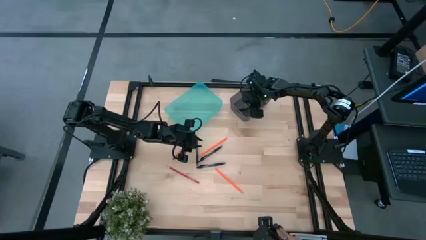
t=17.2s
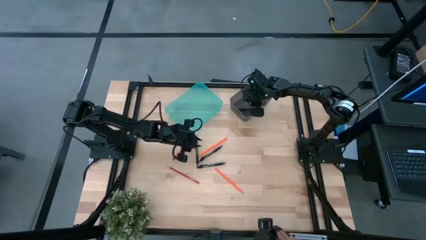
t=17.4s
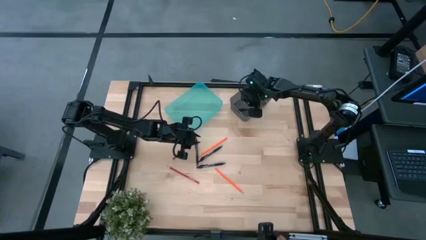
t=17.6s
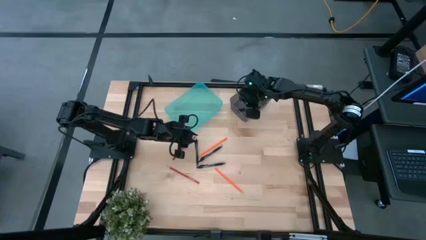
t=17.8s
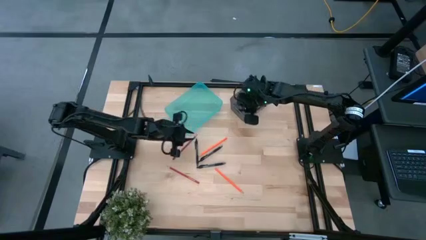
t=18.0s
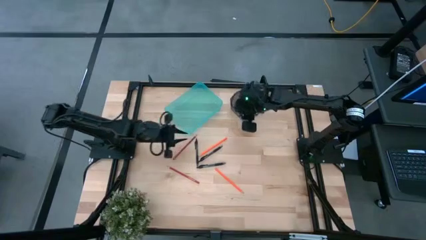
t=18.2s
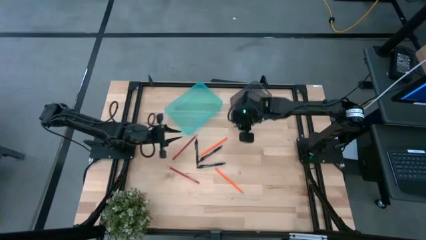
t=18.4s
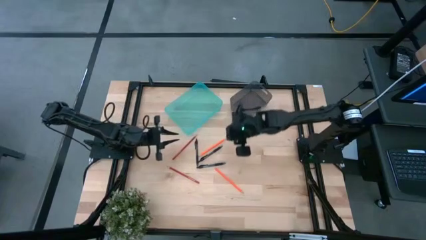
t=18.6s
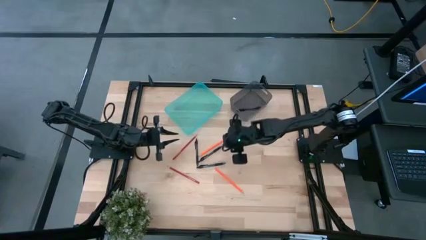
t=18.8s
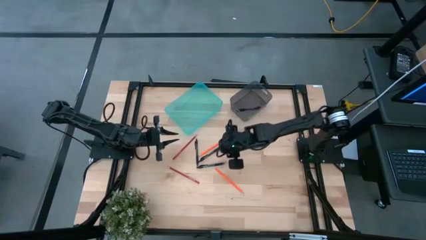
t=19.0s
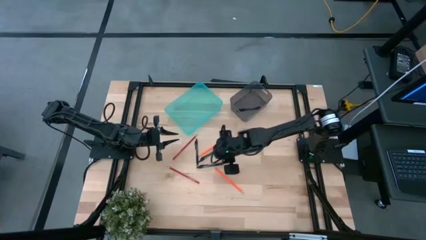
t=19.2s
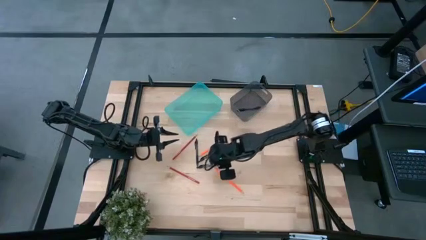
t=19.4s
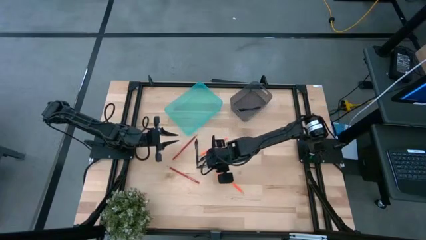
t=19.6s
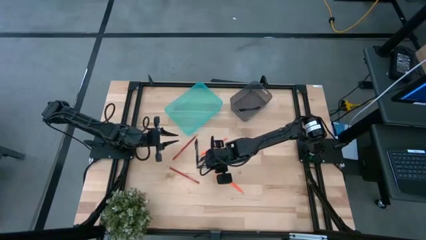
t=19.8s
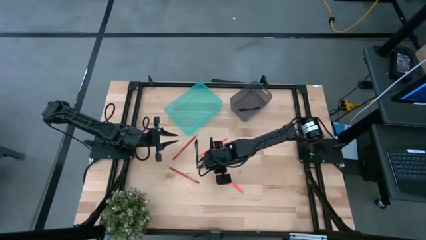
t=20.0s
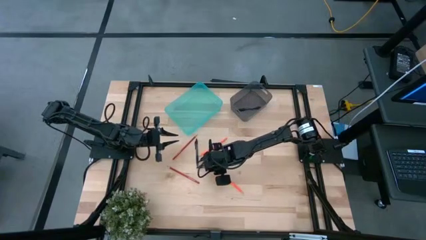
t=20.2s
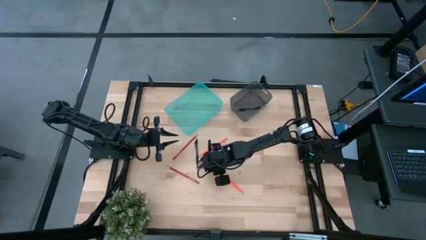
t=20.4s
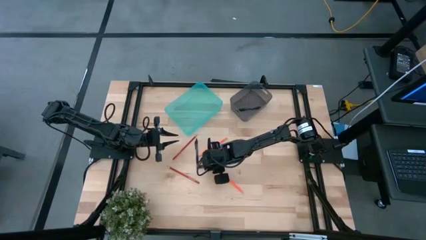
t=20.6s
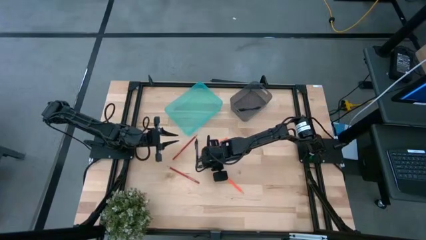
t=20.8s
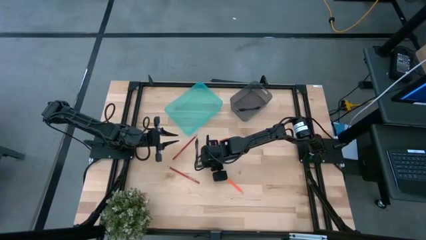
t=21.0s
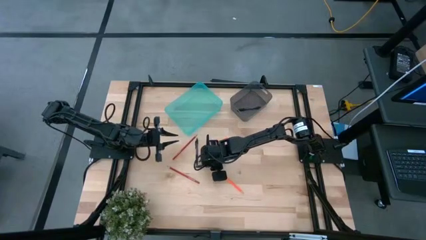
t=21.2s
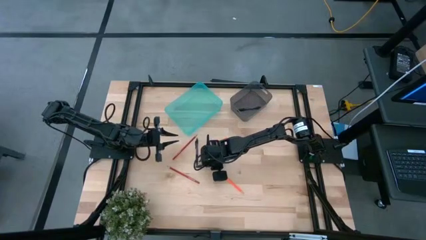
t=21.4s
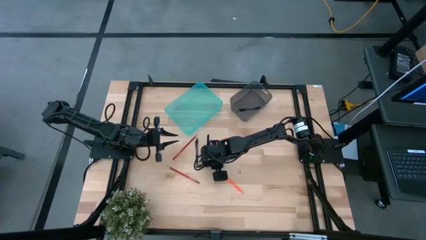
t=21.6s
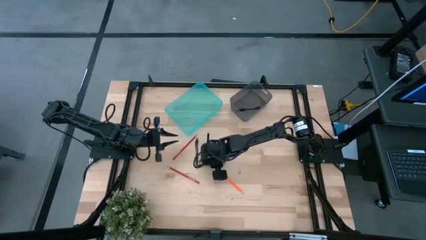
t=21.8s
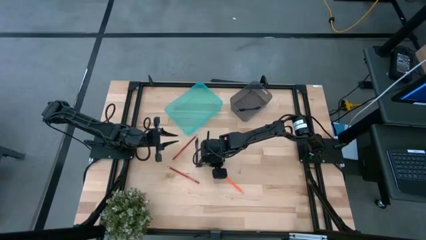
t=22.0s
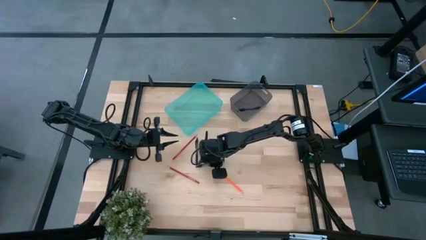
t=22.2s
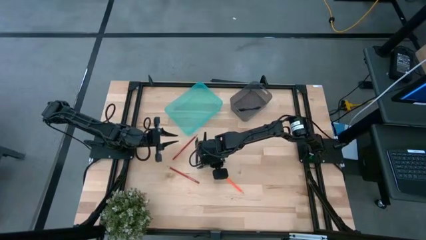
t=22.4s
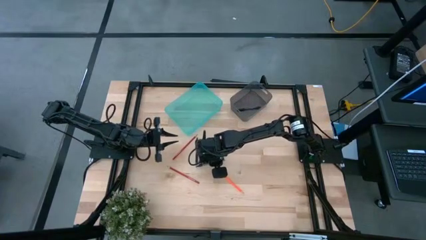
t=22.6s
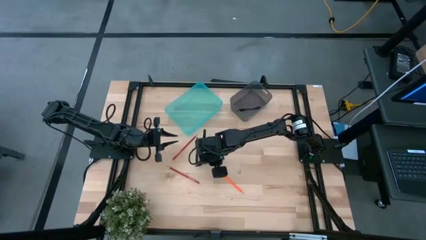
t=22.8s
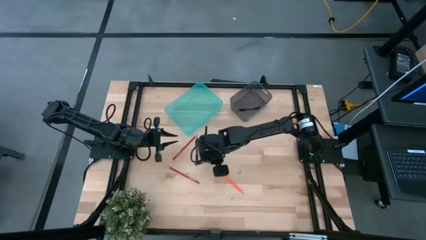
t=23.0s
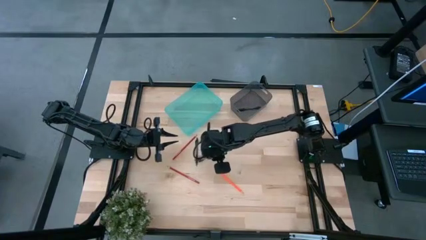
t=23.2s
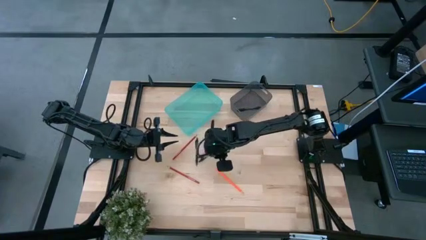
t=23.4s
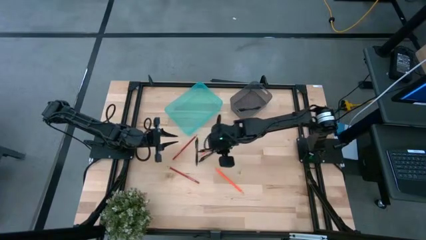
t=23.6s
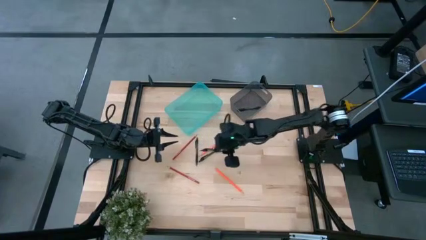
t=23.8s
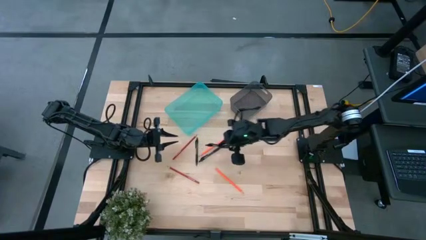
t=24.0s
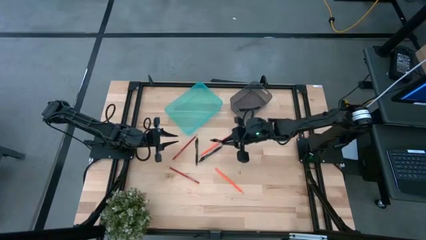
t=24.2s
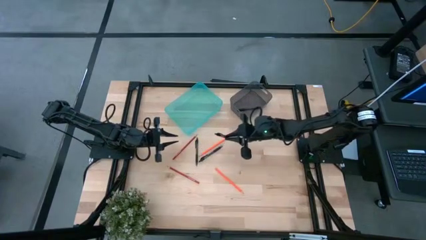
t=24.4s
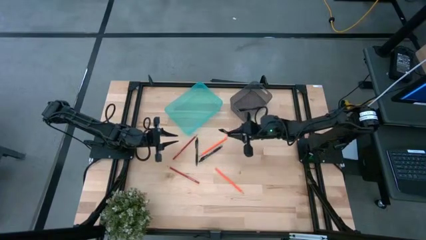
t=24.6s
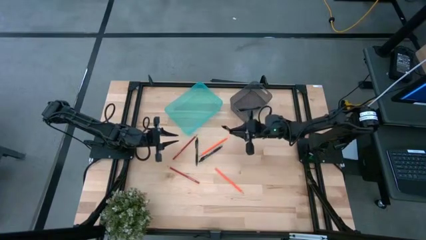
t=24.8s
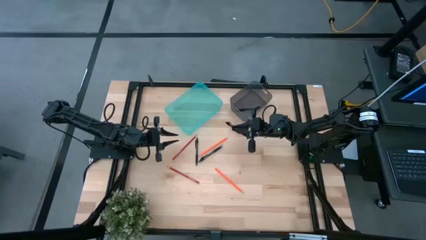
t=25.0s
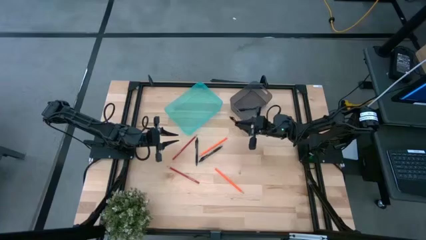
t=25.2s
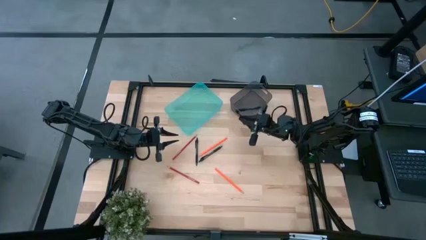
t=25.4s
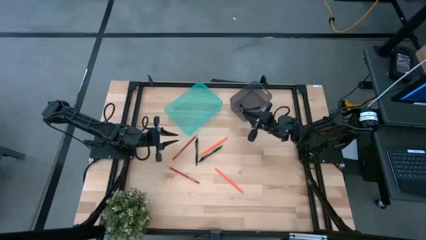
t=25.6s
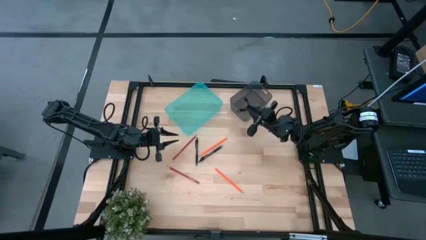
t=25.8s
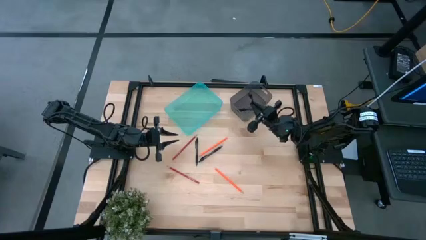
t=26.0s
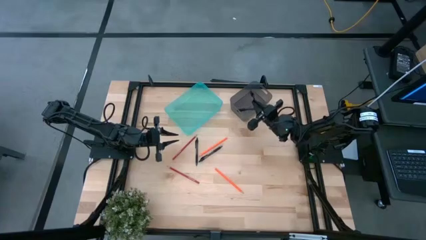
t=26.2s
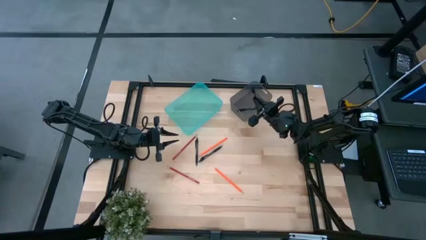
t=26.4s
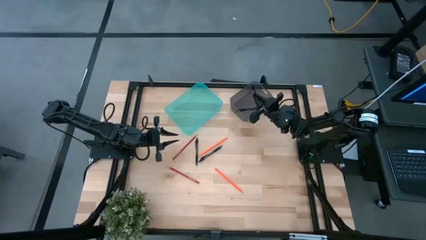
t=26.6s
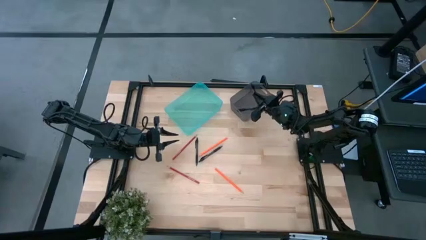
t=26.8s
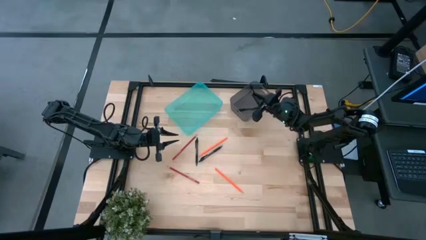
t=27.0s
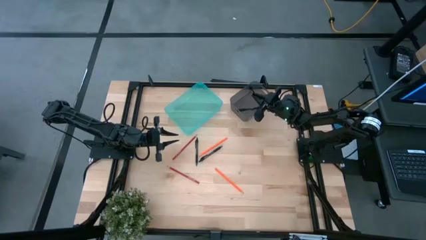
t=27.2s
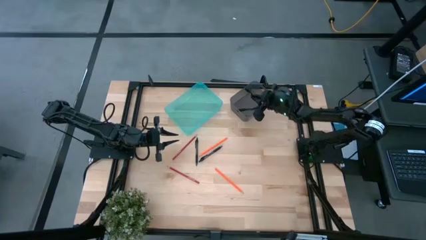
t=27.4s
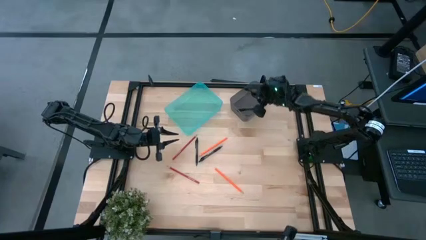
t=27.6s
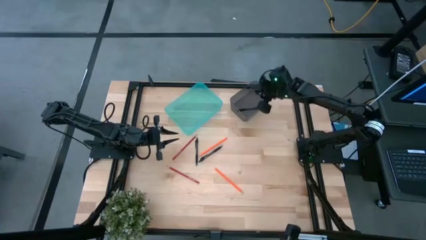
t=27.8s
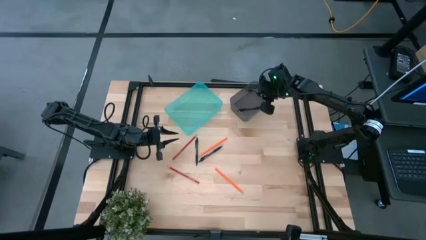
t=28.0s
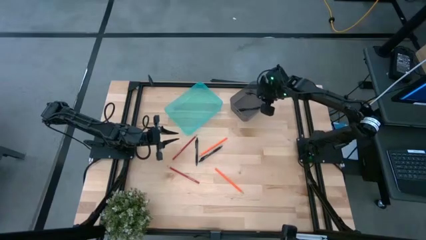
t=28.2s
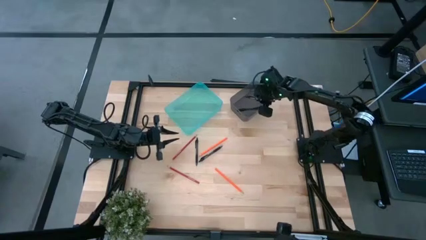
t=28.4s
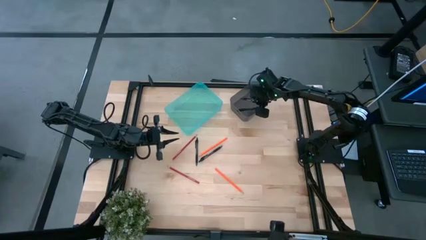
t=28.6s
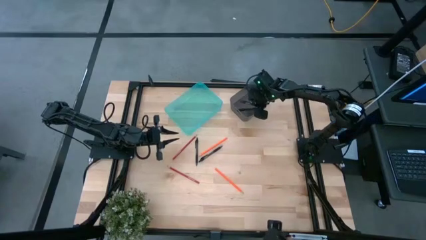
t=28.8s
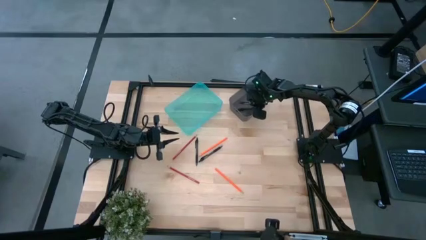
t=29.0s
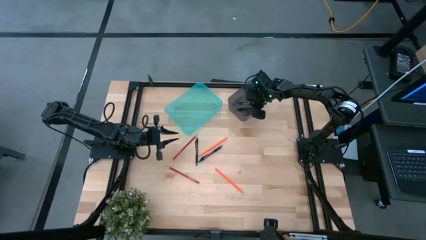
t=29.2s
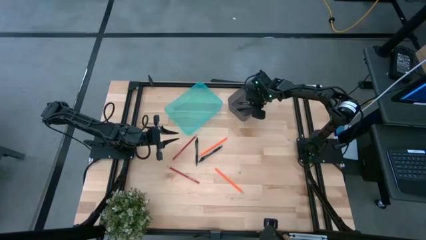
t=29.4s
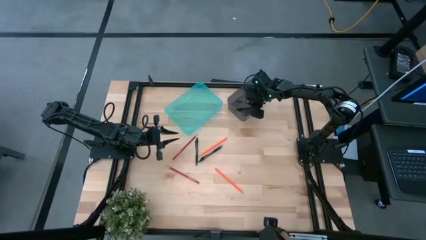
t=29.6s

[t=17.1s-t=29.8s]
Task: Sort pens & pencils
Put the black pen into the gray bin

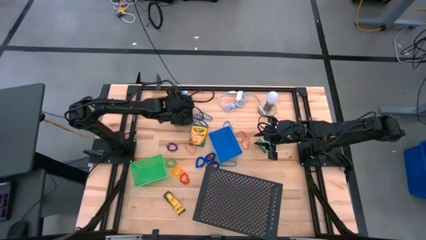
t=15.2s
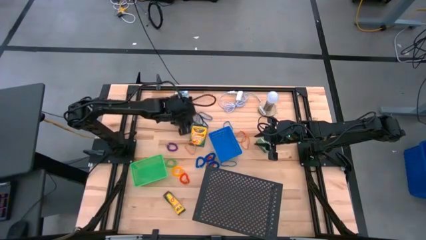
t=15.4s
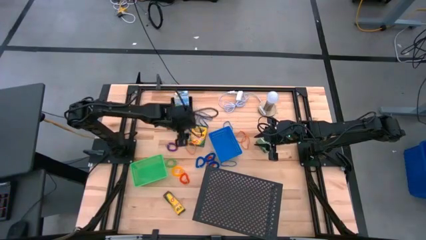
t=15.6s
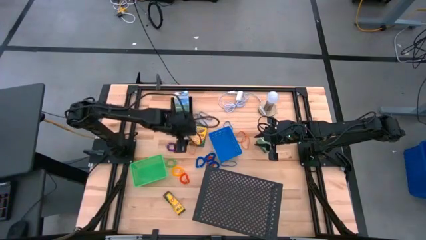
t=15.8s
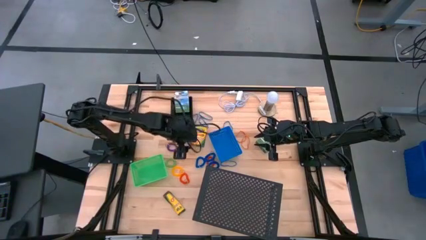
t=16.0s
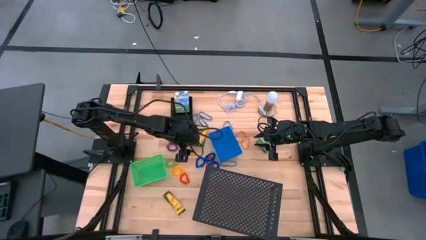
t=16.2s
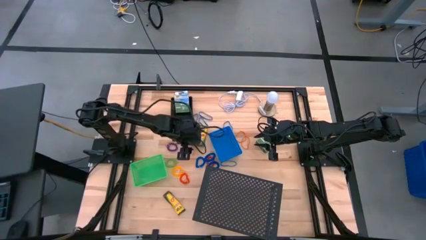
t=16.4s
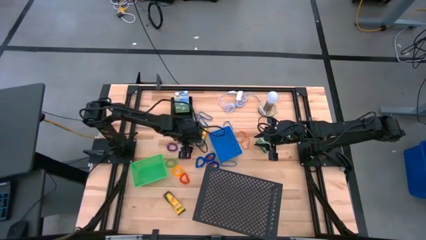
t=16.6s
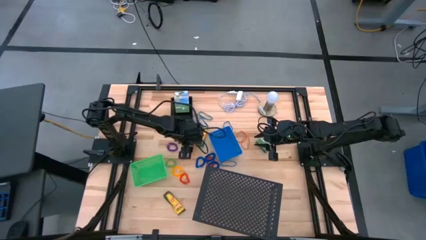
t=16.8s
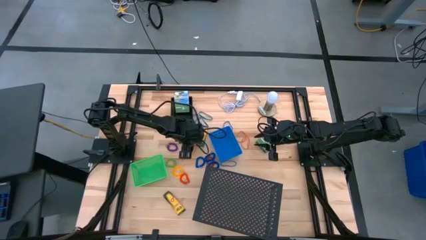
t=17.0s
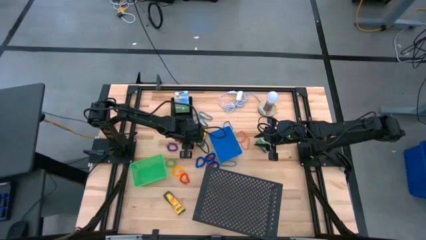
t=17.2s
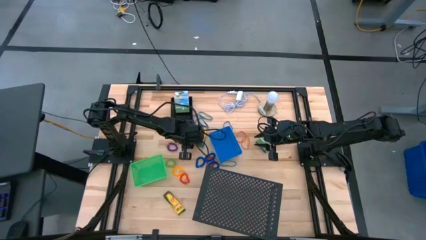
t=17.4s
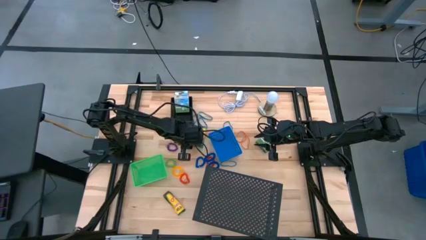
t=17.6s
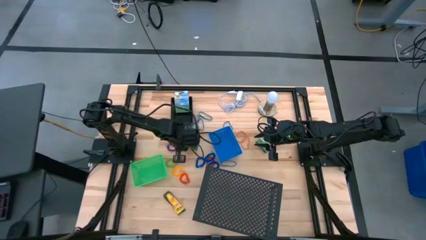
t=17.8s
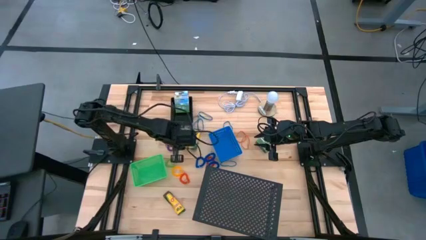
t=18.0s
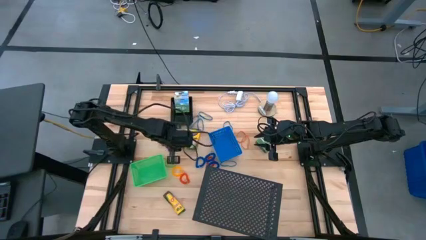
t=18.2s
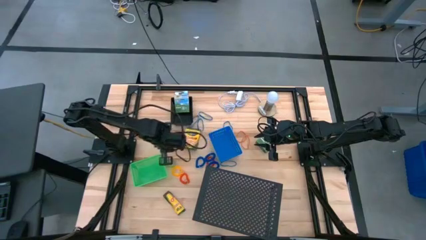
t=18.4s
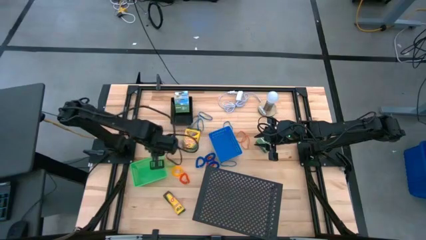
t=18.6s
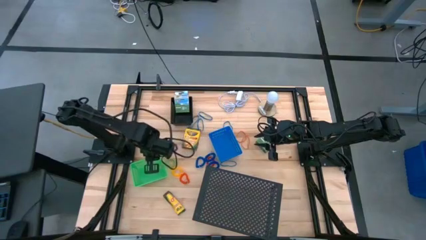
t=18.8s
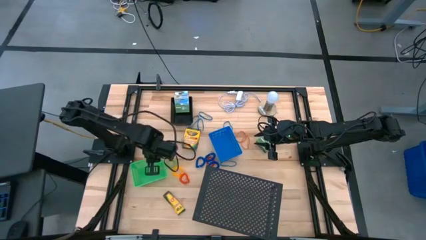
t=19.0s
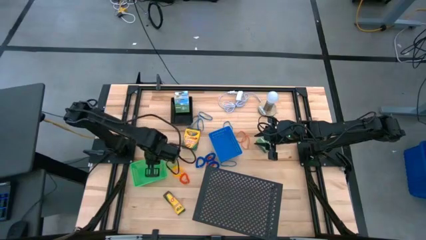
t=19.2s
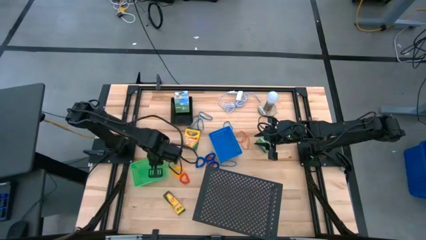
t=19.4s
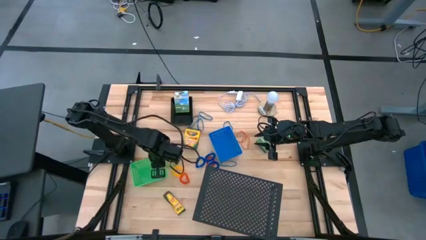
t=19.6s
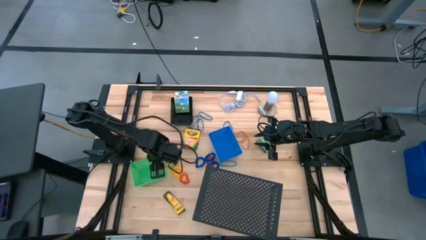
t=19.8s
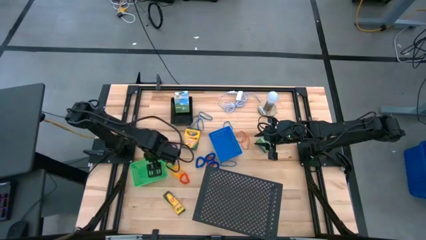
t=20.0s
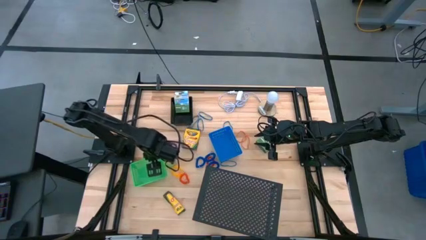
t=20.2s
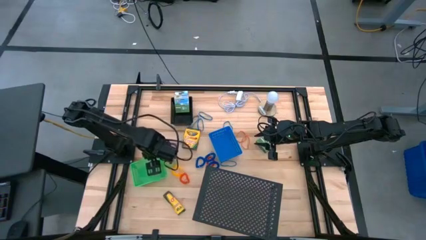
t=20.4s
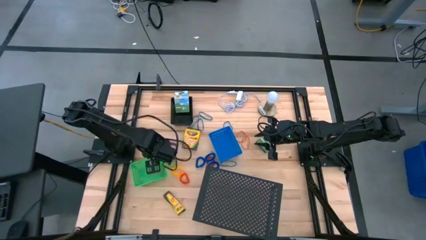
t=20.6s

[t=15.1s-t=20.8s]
Task: Pick & Place Office Desk Supplies
Put the yellow rubber band into the green bin
